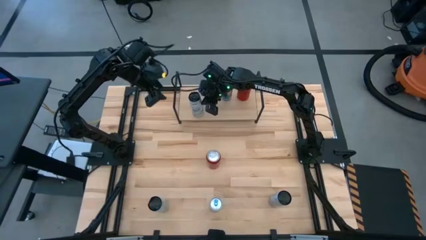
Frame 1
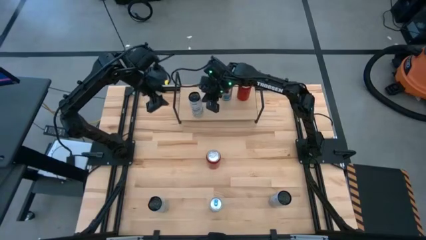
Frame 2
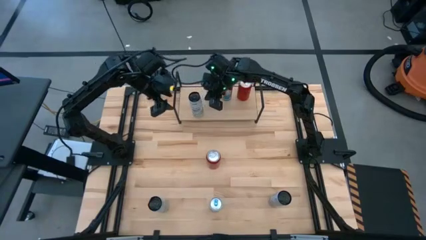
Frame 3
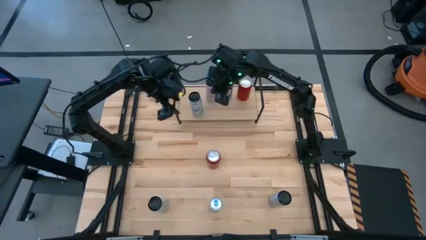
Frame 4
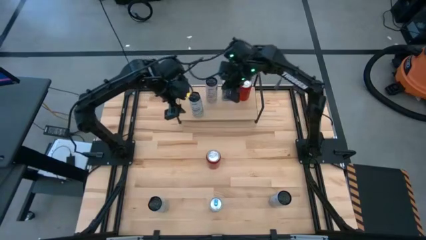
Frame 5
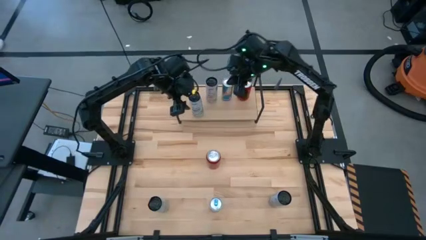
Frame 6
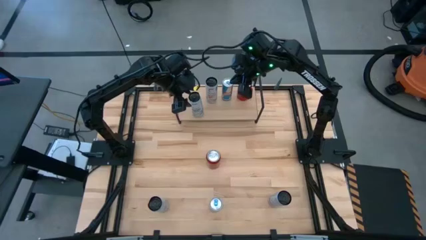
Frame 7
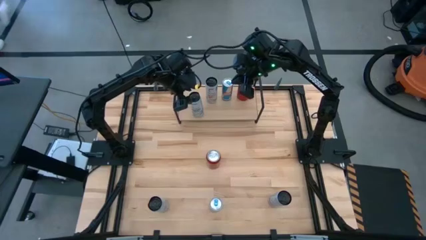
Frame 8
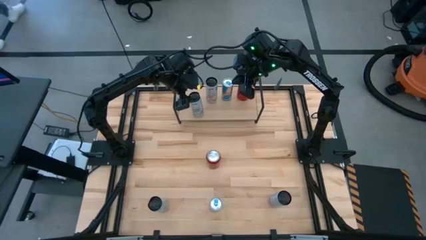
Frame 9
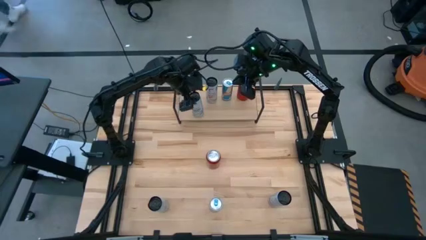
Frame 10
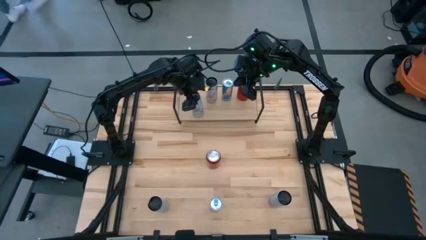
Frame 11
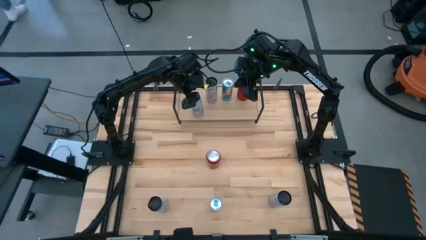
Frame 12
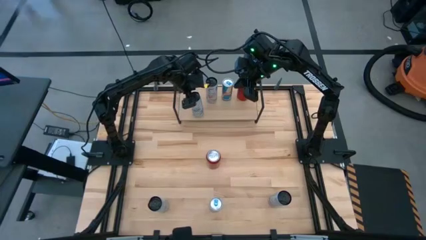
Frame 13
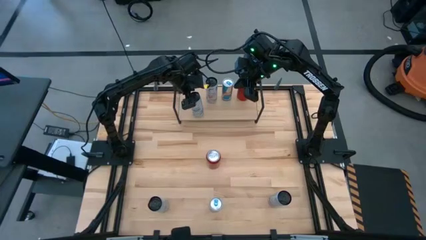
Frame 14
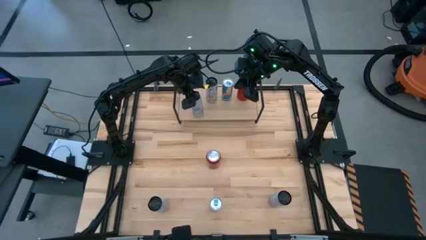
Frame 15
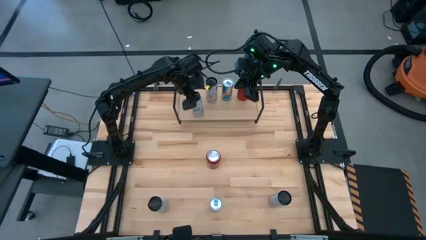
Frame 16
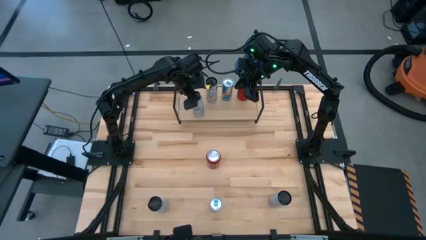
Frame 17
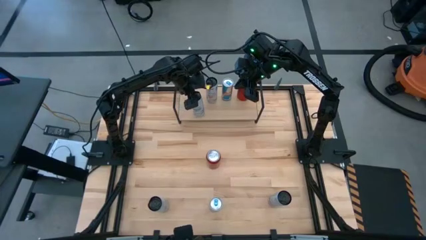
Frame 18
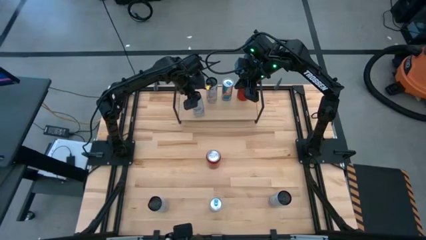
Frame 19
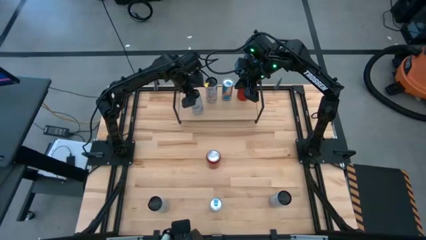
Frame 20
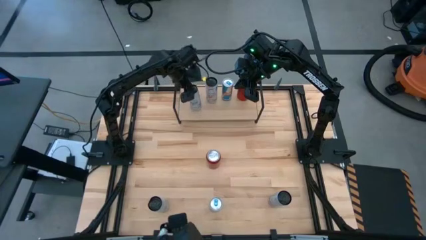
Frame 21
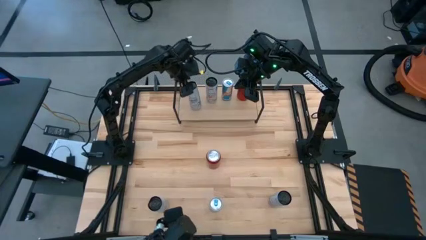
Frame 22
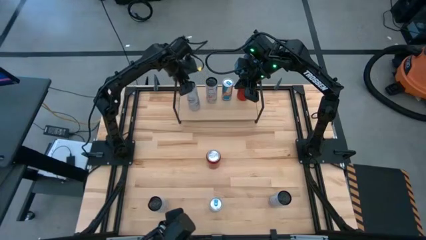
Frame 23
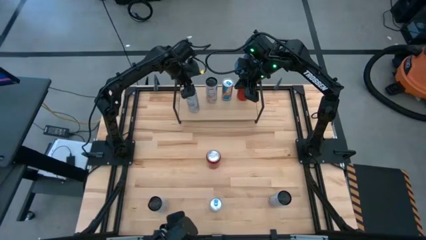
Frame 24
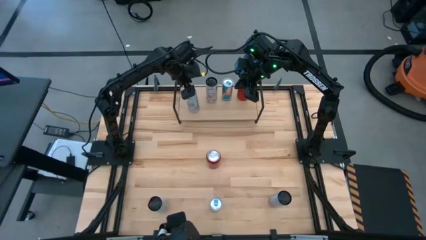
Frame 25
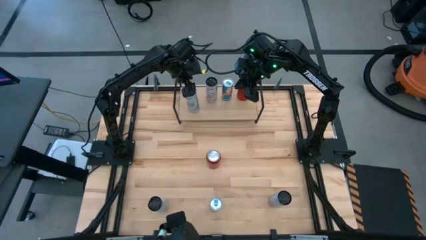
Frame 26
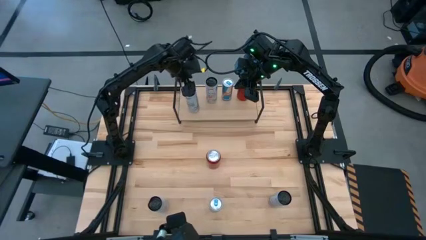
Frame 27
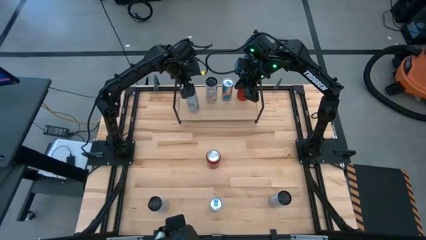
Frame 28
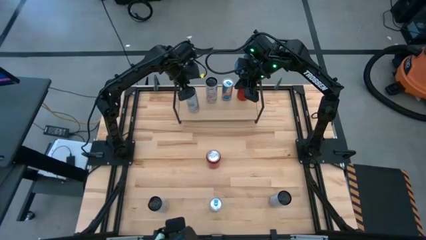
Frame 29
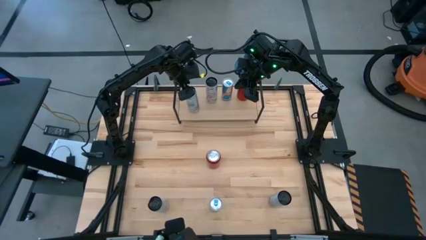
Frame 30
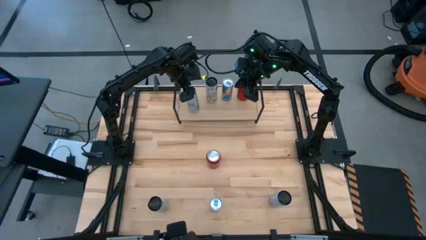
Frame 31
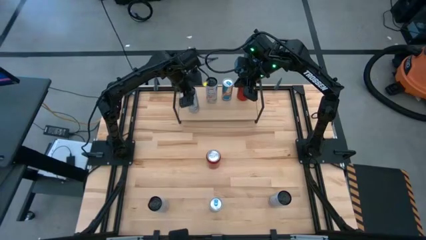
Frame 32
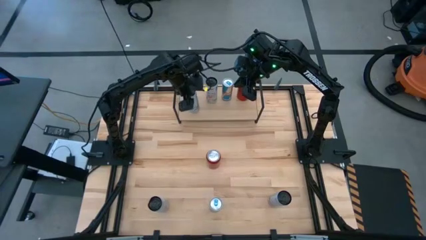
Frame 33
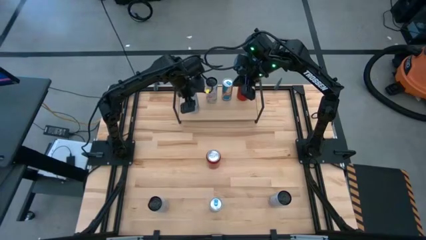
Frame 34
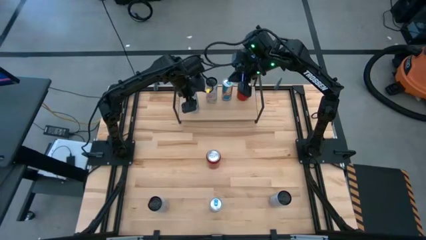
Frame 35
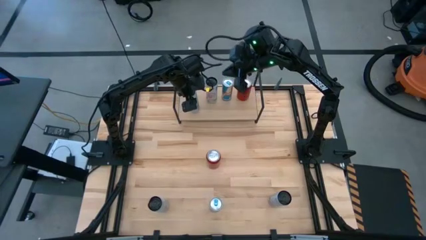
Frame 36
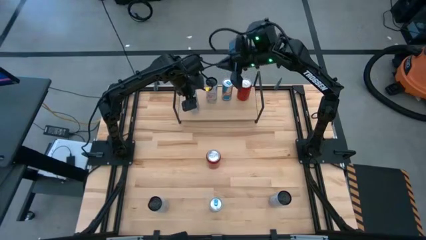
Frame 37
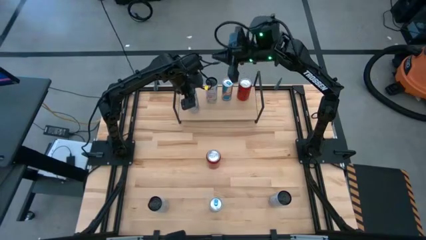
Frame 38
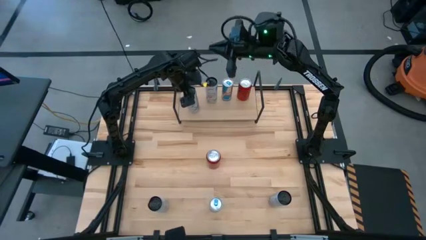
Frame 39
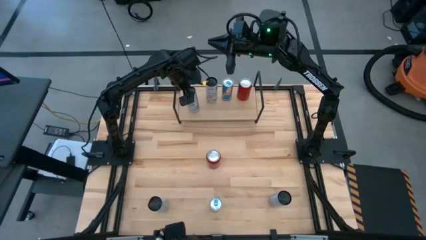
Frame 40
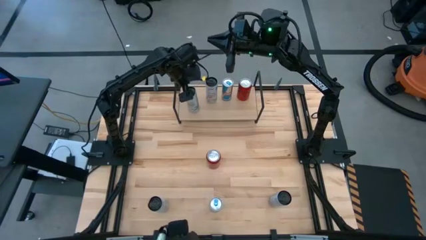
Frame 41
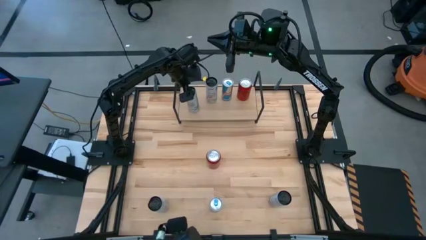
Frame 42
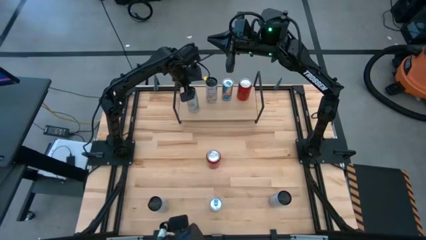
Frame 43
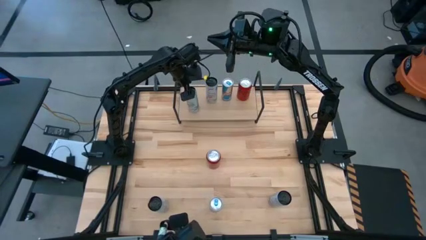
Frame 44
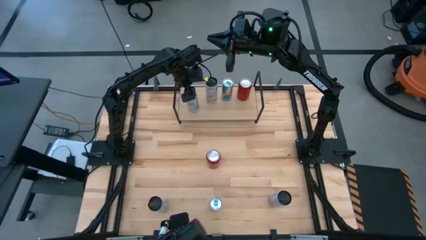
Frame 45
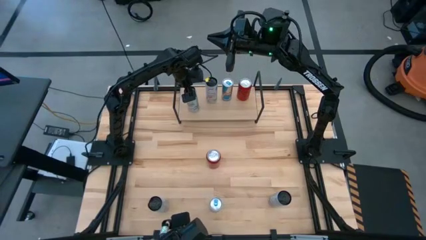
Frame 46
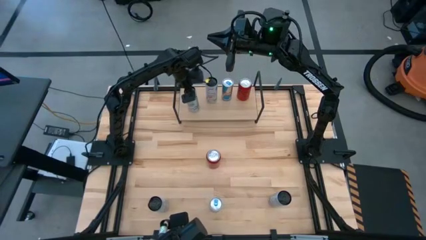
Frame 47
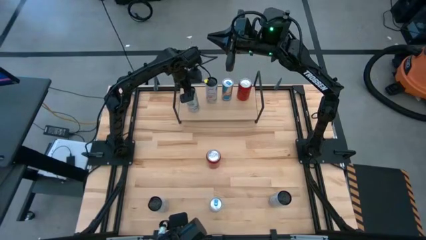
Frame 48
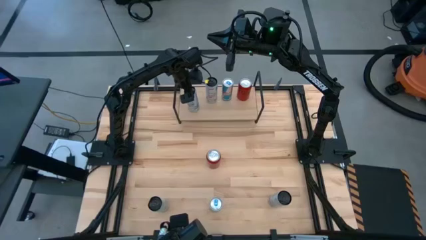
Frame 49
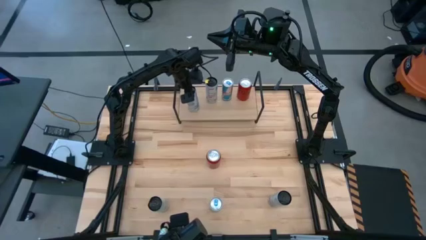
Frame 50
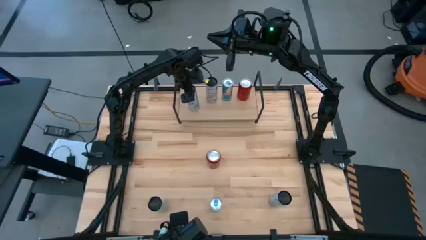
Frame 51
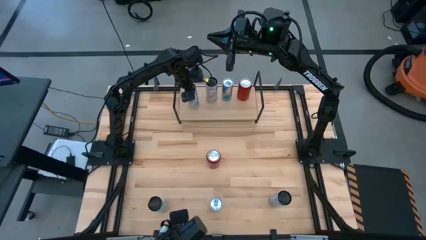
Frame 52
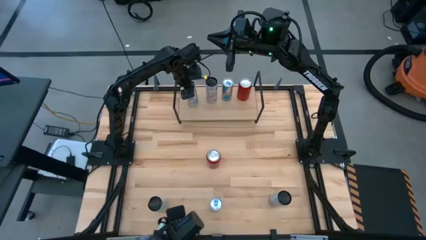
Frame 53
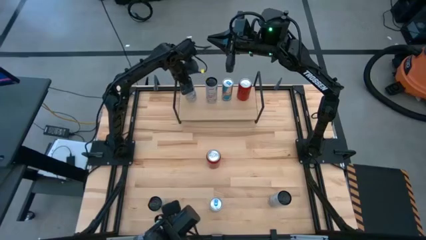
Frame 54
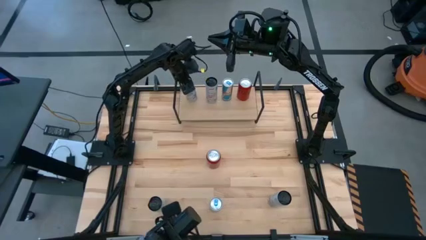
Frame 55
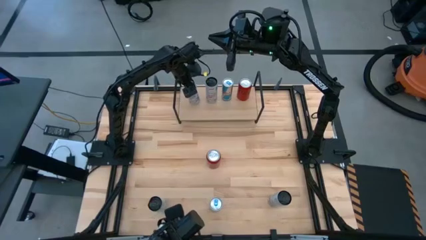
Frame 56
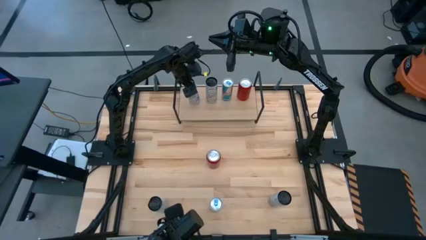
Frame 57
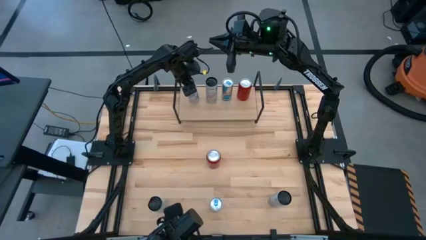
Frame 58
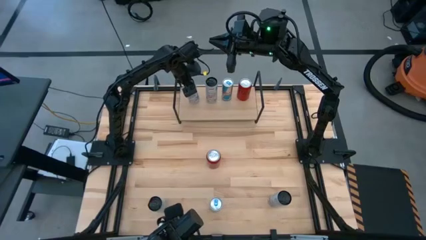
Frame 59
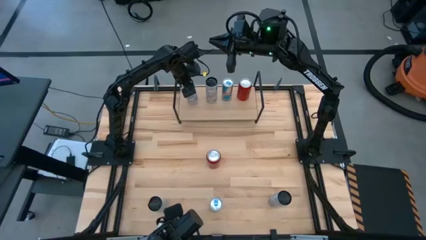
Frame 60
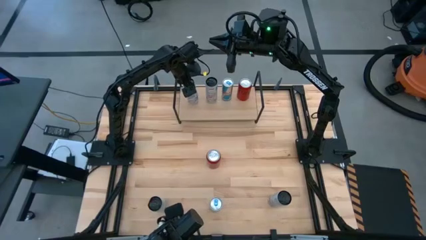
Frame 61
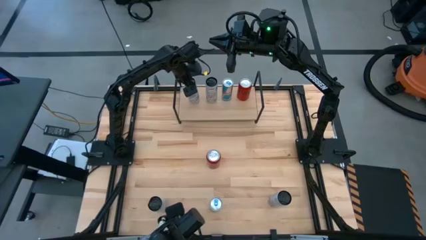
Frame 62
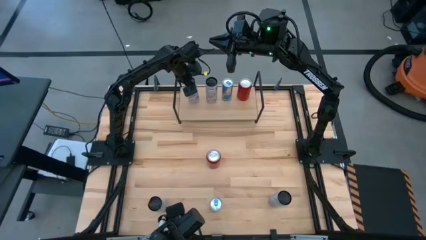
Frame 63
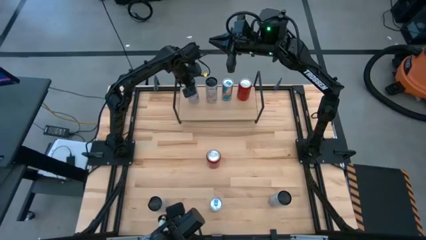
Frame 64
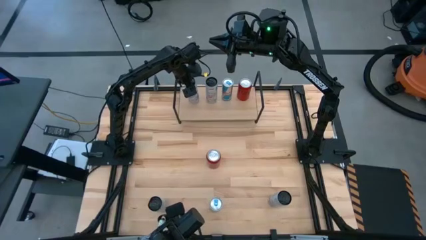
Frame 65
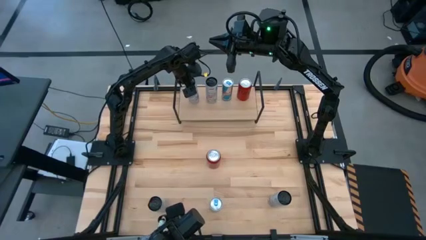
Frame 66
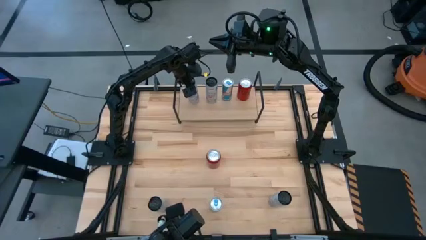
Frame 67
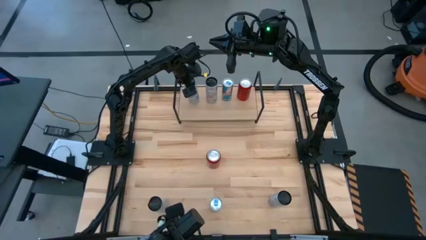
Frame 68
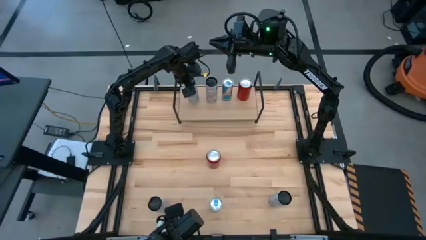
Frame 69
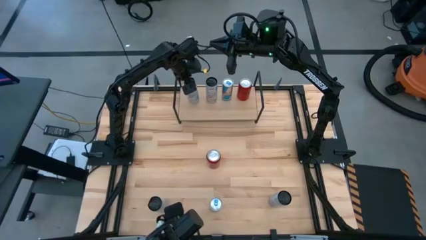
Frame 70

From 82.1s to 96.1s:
Task: Place canned beverage on shelf
Put the top white and blue soda can on the shelf

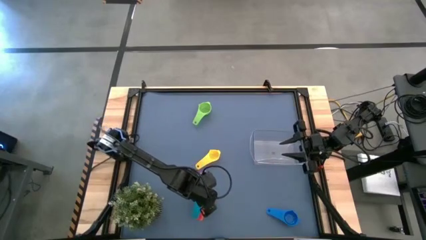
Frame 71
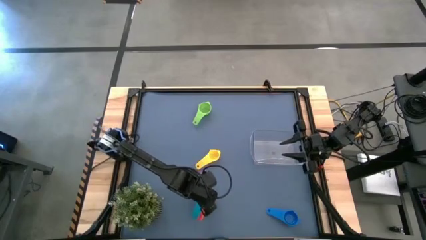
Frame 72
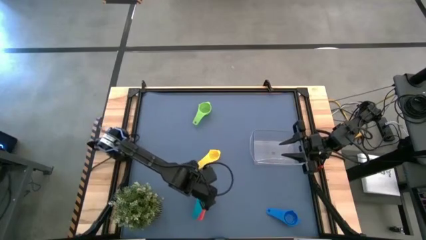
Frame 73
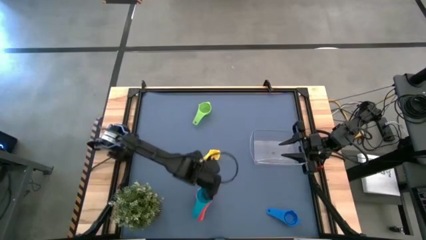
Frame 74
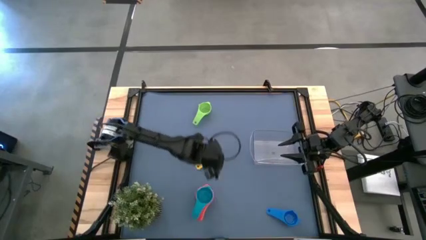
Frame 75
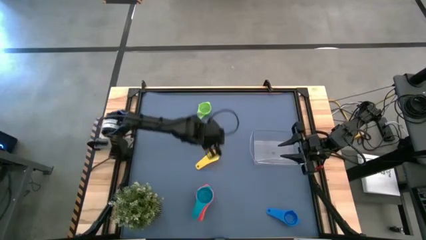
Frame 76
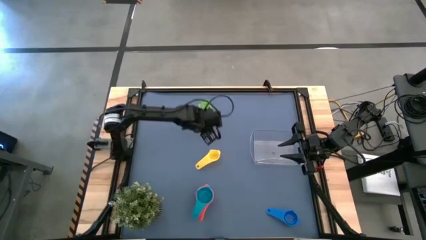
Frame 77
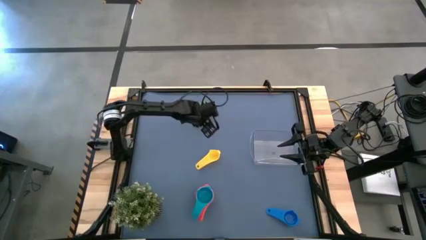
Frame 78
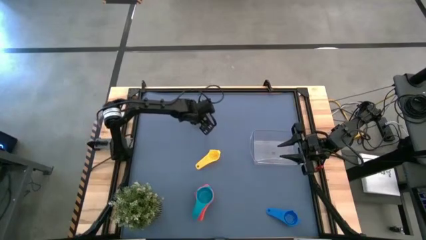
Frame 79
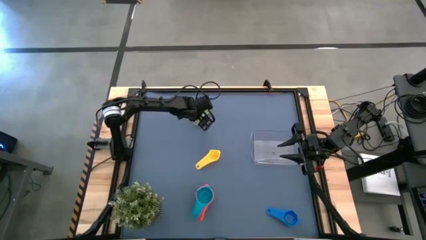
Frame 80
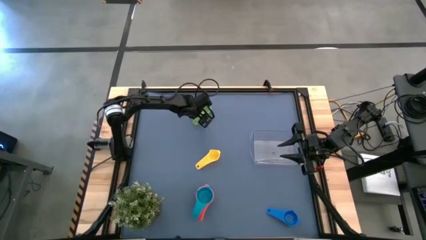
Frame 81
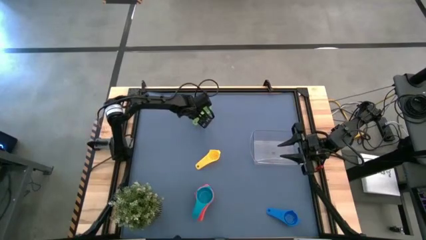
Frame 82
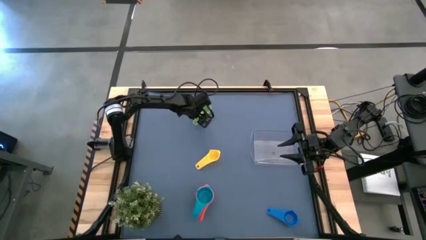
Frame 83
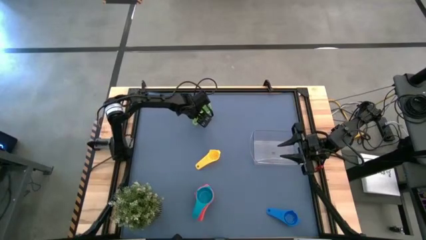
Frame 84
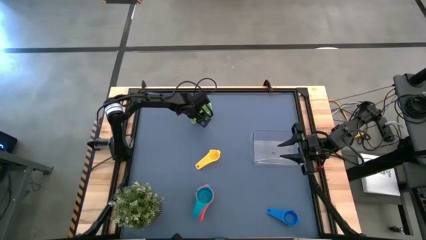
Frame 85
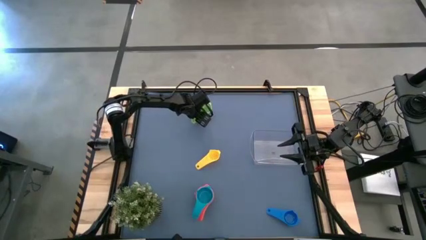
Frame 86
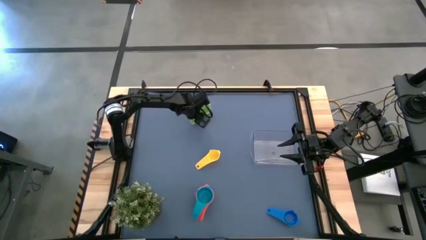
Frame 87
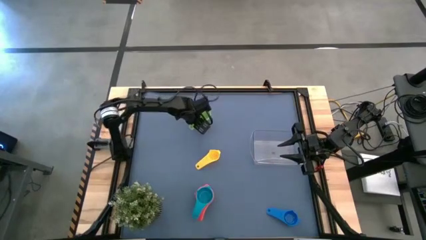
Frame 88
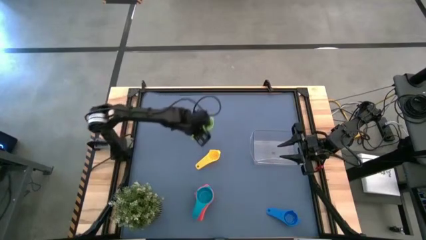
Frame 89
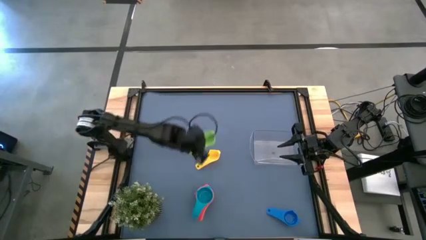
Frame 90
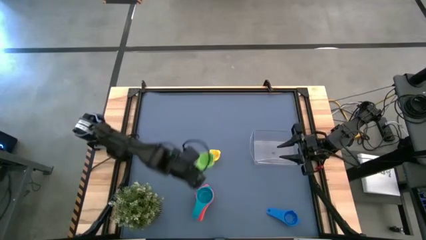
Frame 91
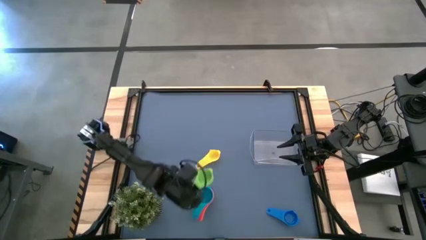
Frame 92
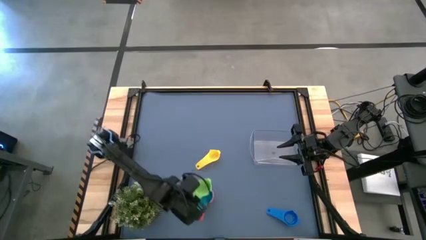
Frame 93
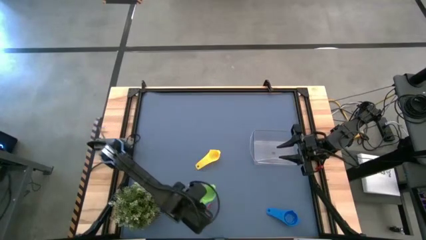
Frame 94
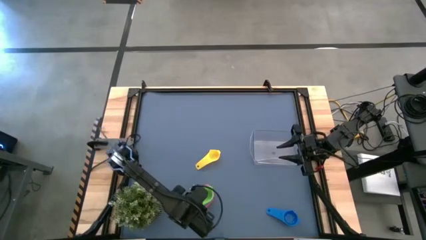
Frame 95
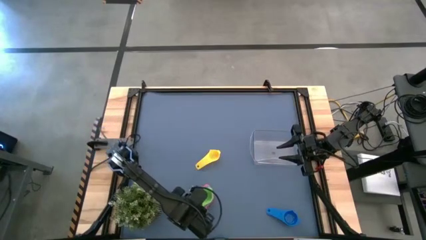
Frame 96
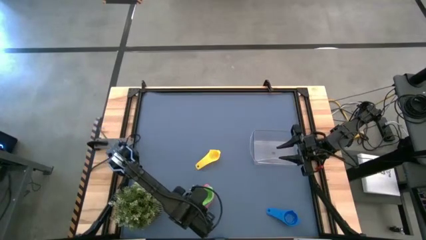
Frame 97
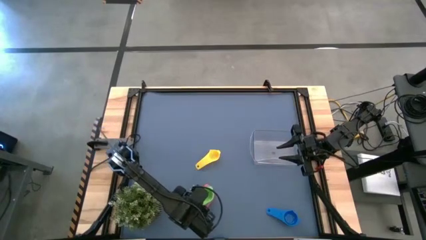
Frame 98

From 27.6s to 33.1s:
Task: Nest measuring cups in basket
Stack the green measuring cup on top of the light blue measuring cup
